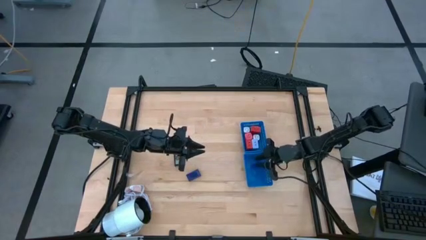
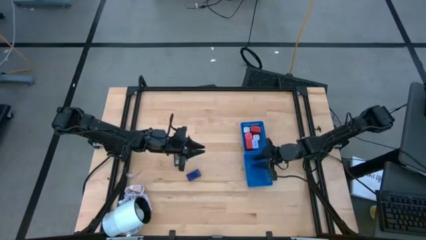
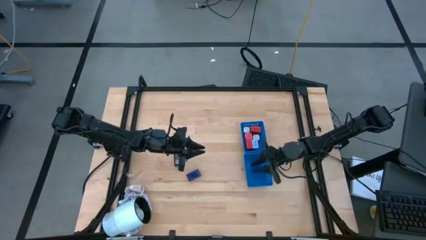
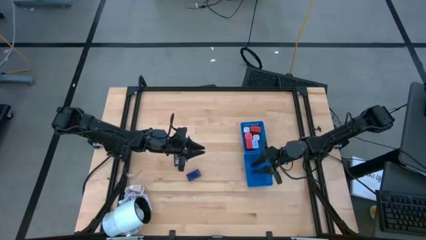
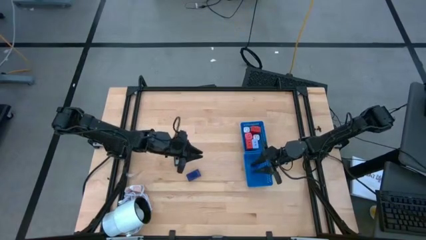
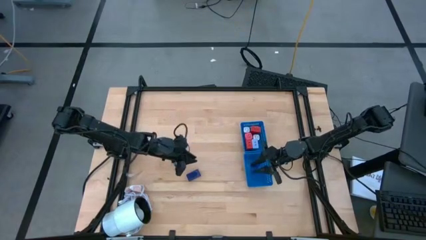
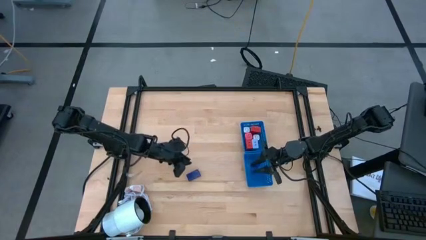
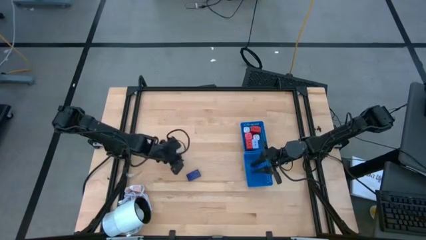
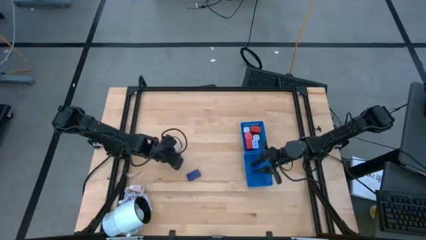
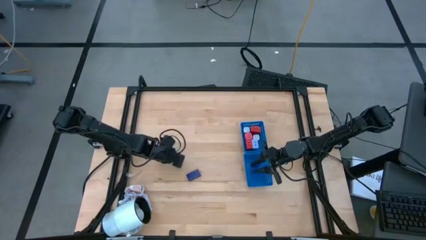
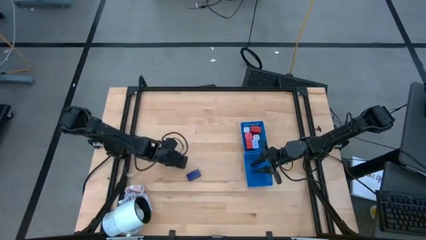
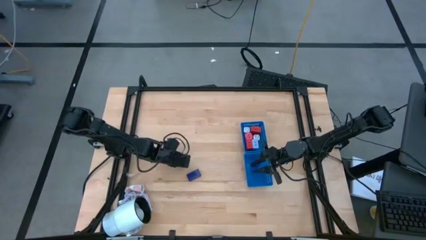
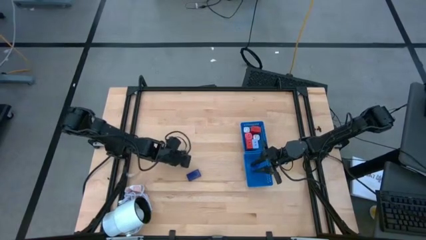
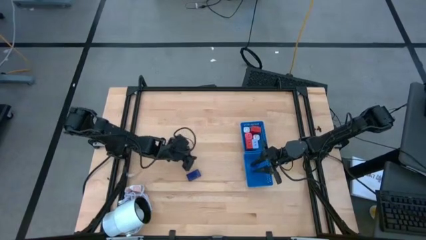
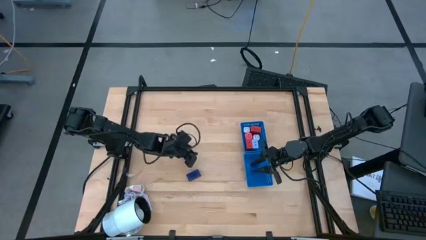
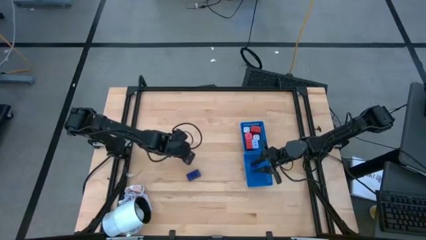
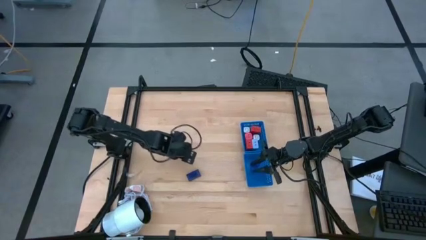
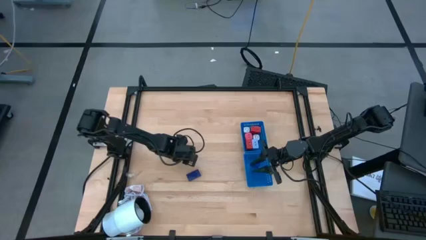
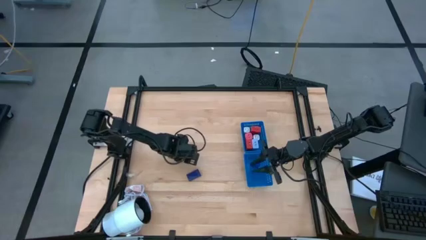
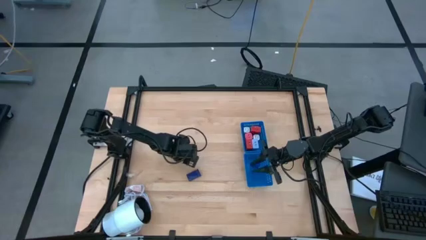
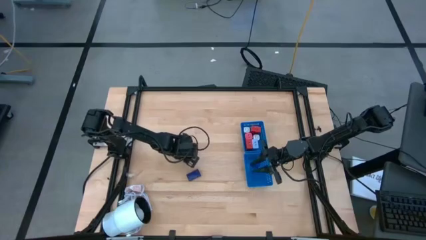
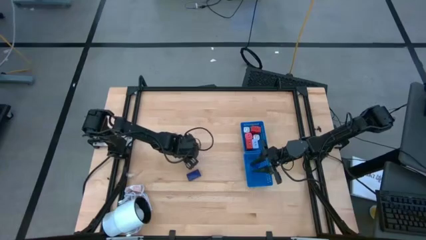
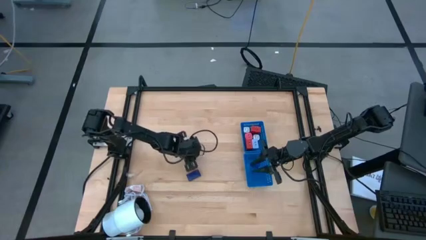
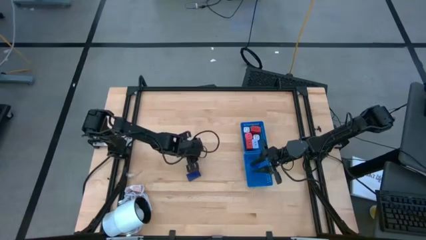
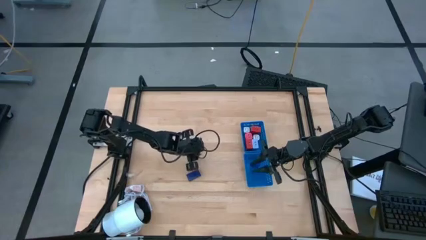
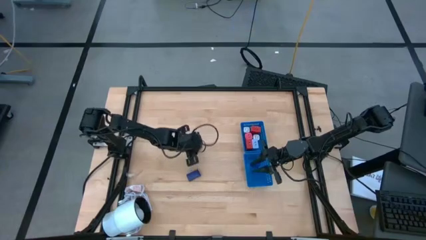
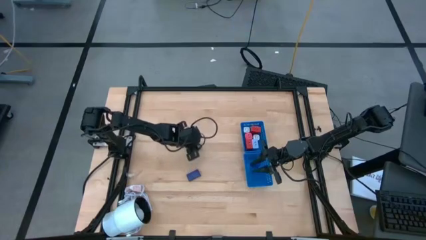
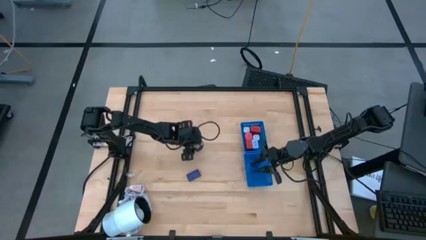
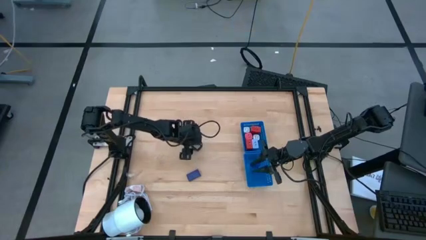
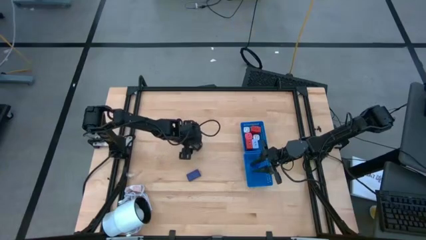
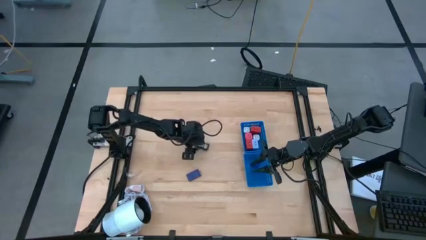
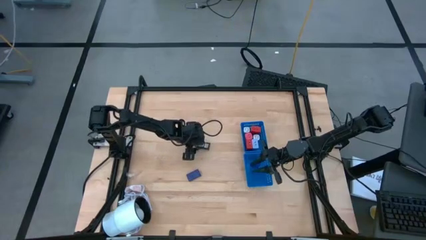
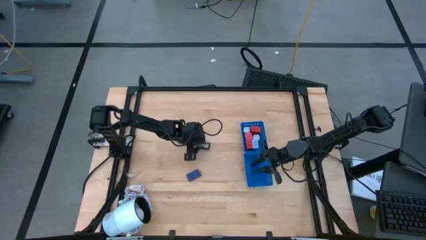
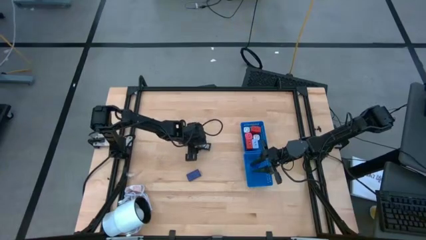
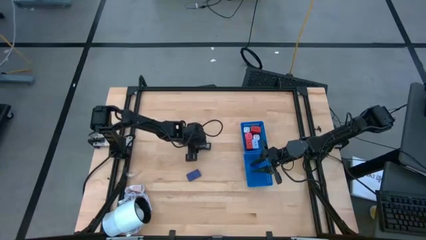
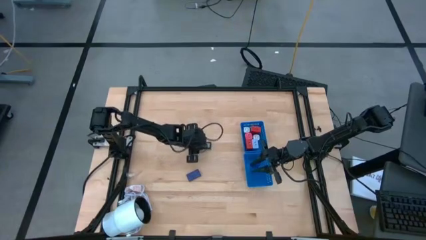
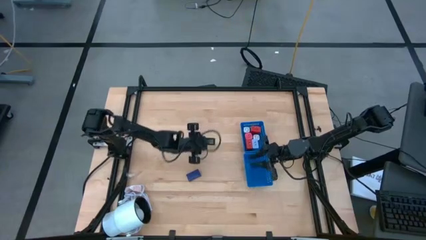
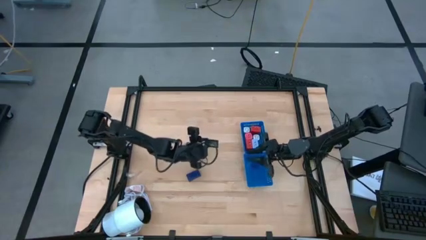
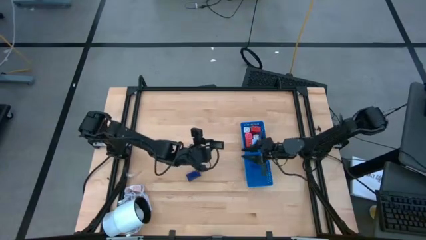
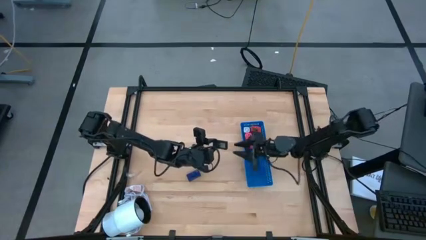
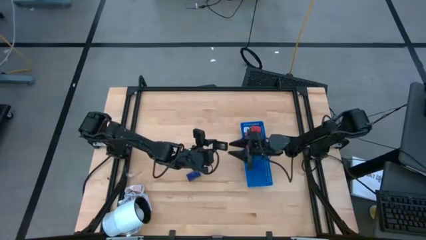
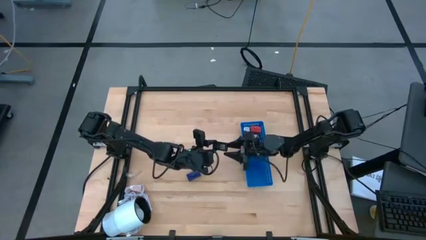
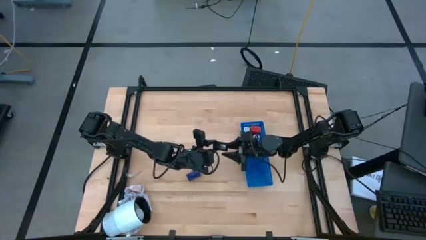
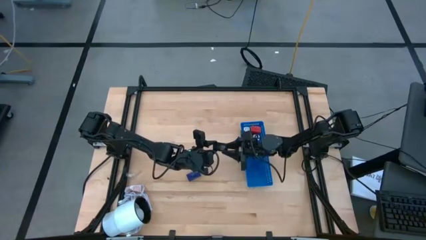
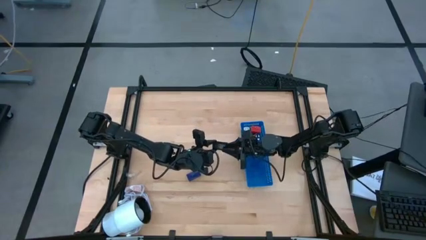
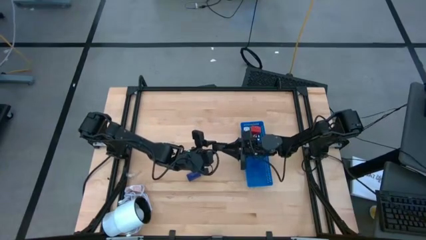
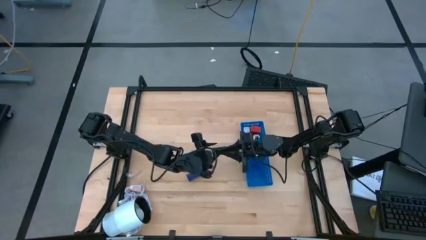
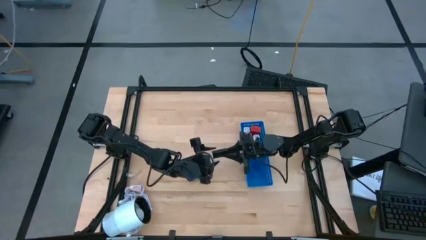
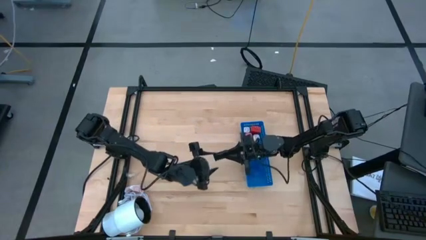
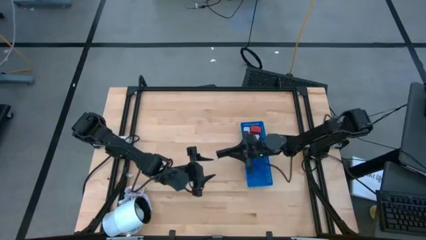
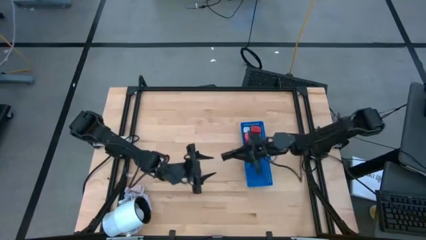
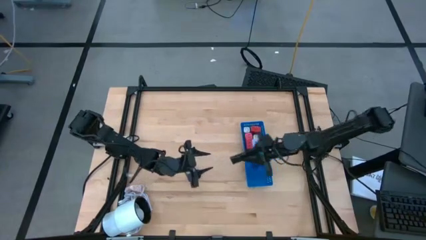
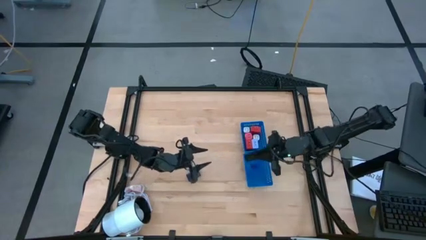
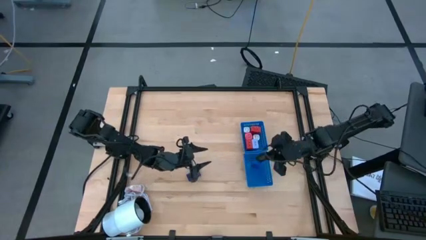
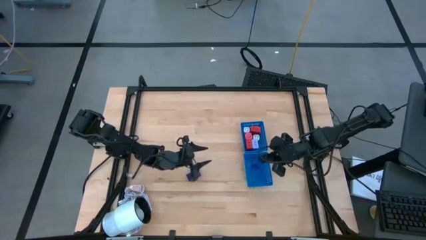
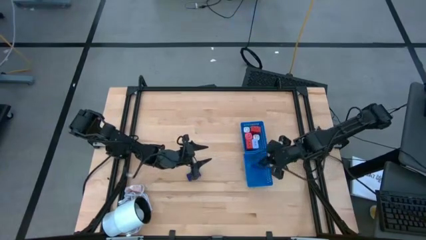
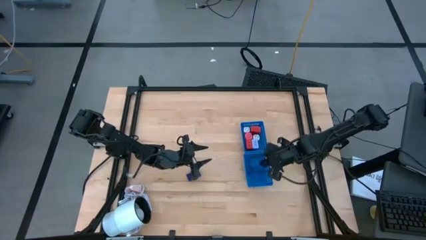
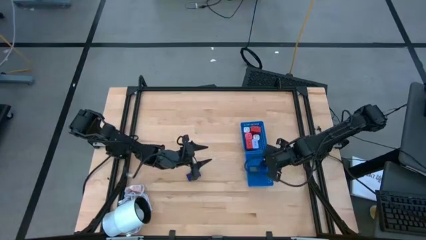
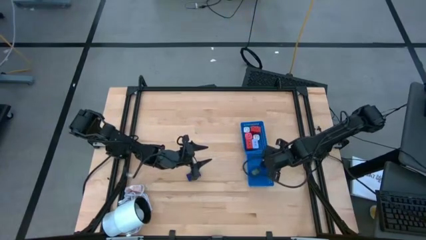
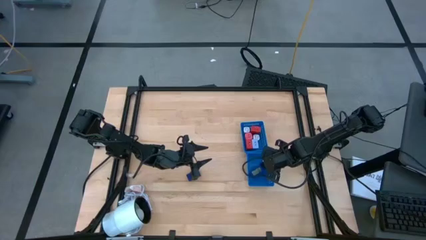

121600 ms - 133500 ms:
Task: Pick & Place Office items
Put the black digital timer into the bottom blue bin
